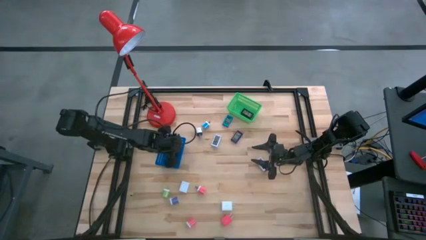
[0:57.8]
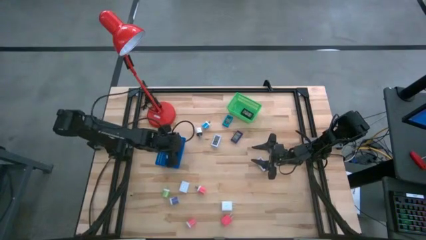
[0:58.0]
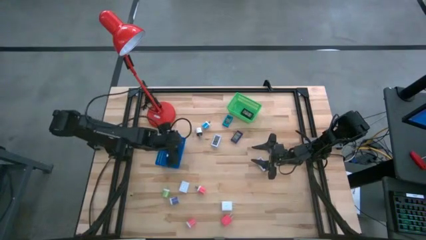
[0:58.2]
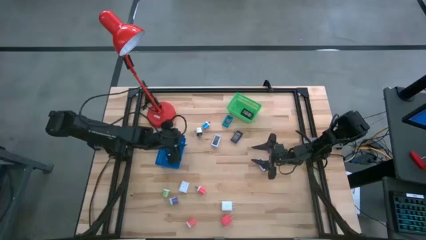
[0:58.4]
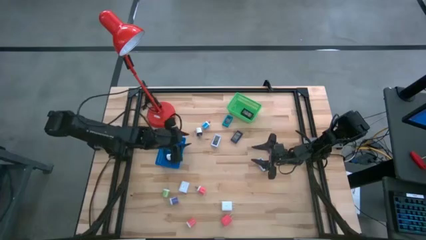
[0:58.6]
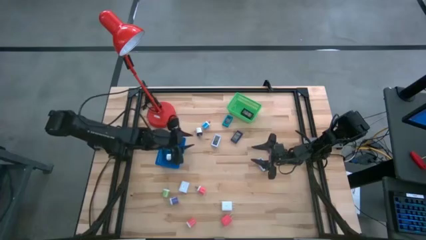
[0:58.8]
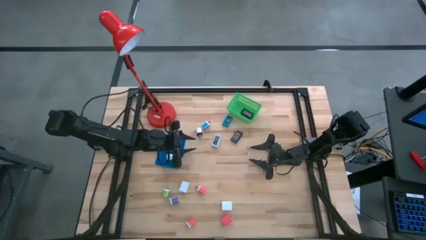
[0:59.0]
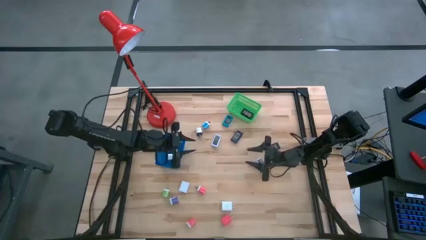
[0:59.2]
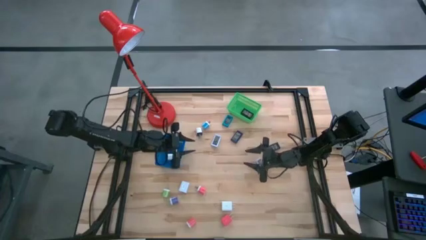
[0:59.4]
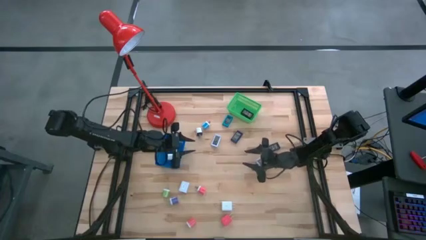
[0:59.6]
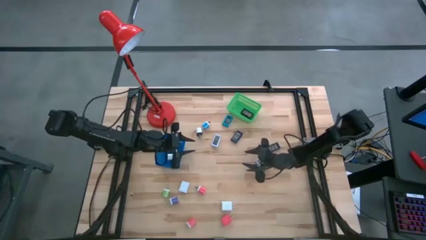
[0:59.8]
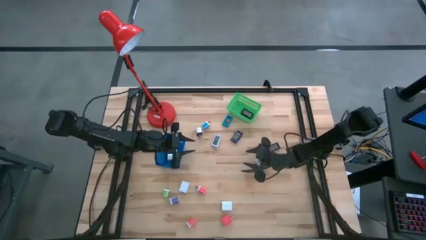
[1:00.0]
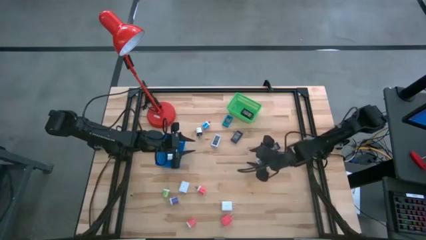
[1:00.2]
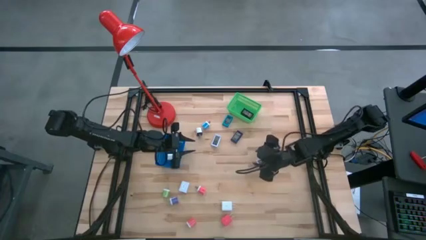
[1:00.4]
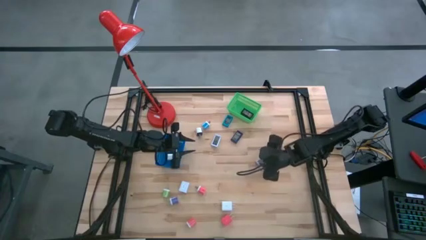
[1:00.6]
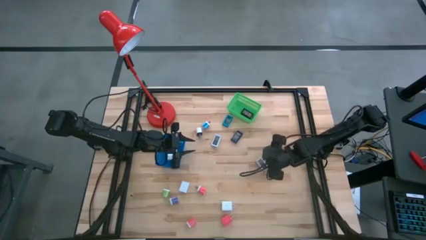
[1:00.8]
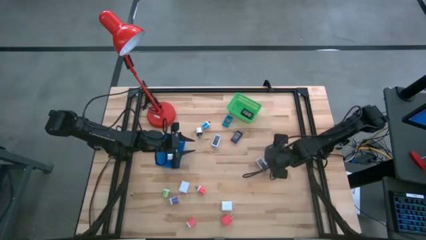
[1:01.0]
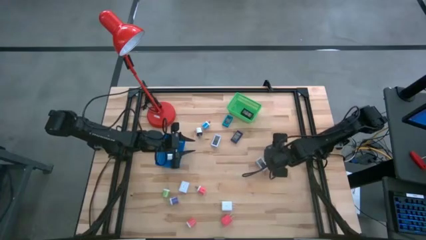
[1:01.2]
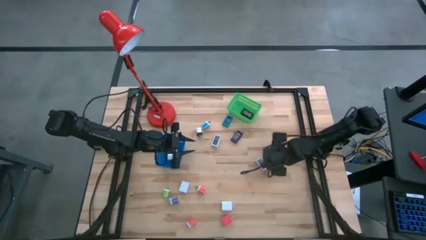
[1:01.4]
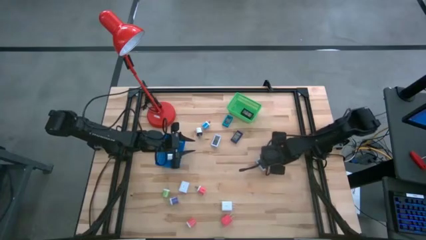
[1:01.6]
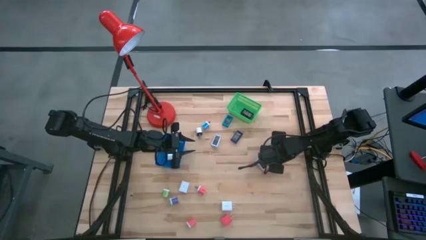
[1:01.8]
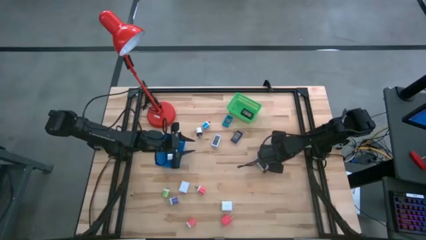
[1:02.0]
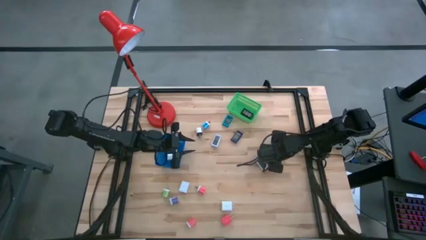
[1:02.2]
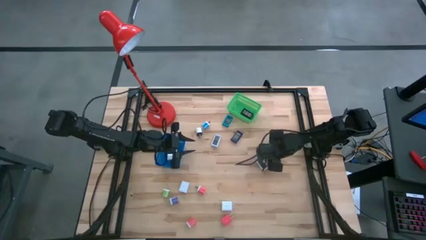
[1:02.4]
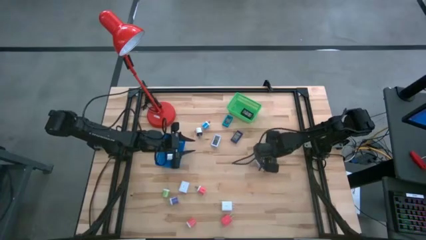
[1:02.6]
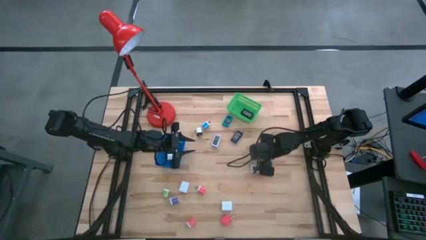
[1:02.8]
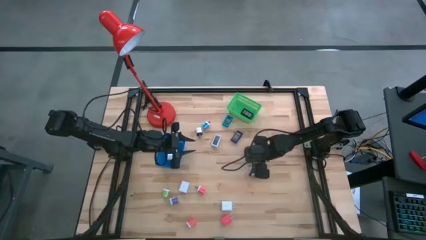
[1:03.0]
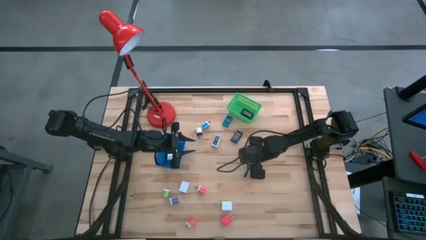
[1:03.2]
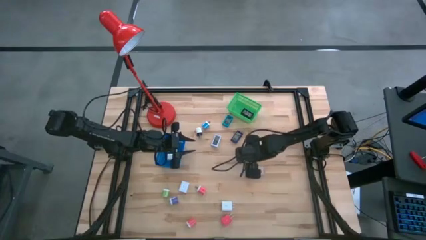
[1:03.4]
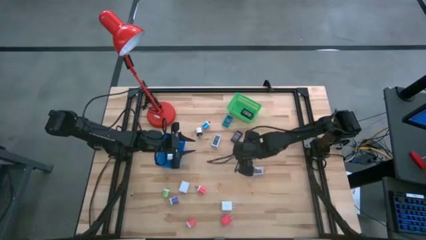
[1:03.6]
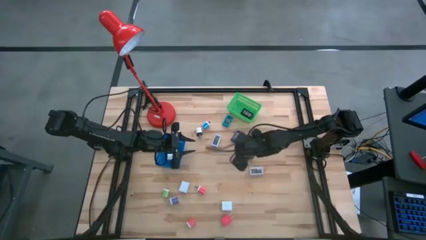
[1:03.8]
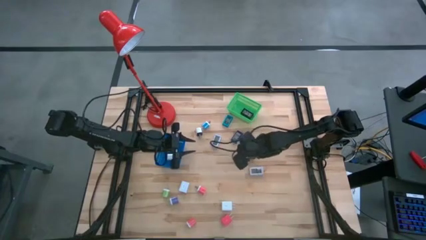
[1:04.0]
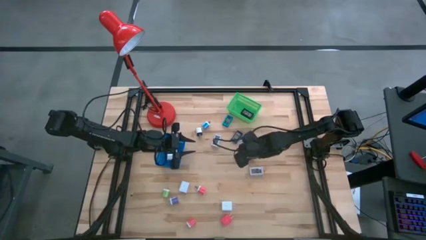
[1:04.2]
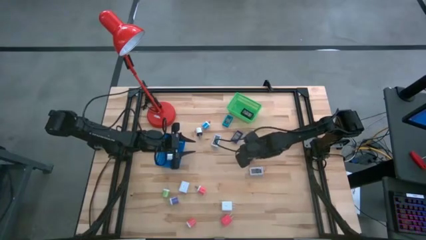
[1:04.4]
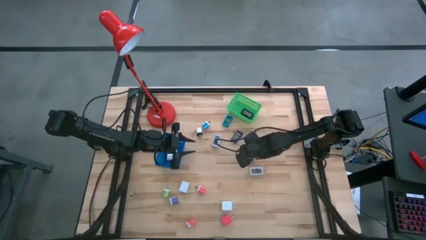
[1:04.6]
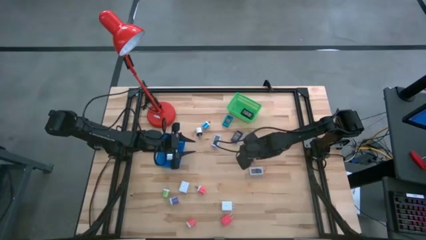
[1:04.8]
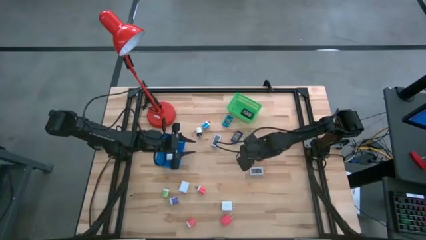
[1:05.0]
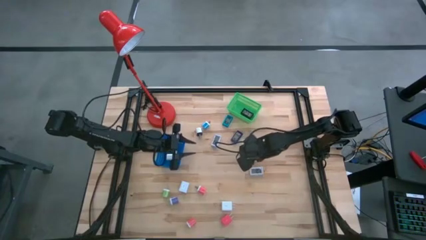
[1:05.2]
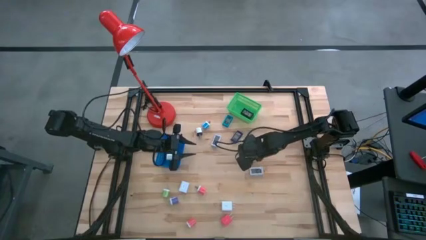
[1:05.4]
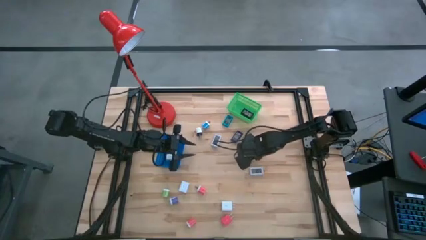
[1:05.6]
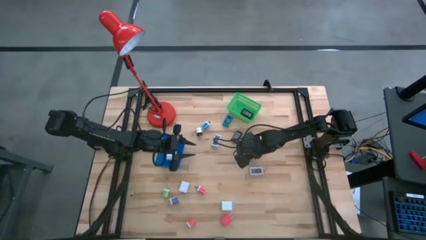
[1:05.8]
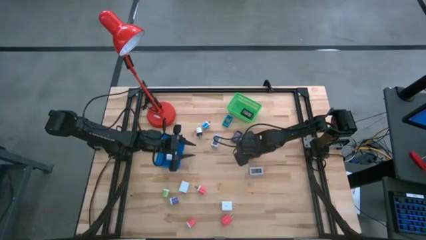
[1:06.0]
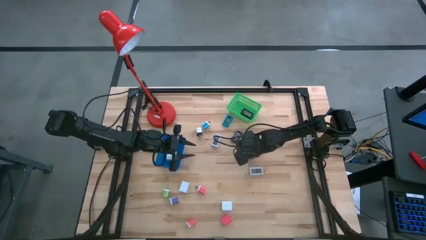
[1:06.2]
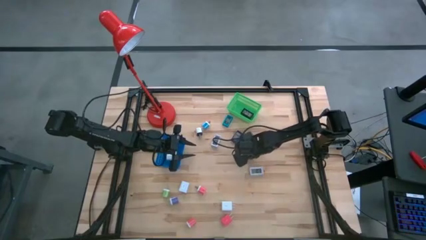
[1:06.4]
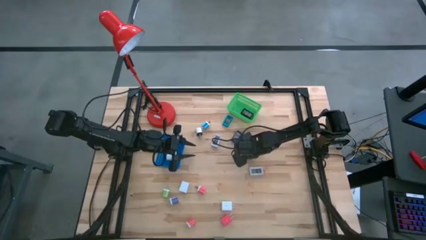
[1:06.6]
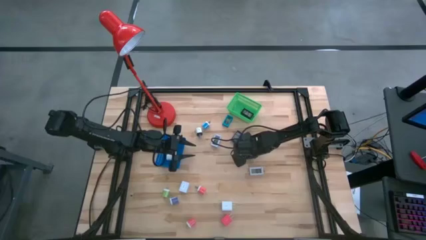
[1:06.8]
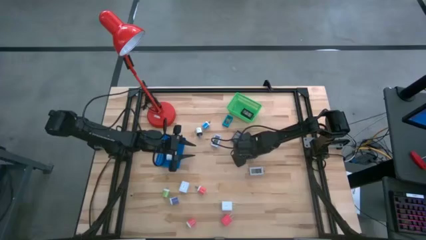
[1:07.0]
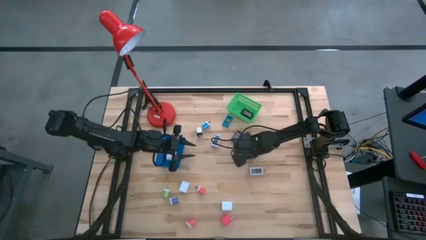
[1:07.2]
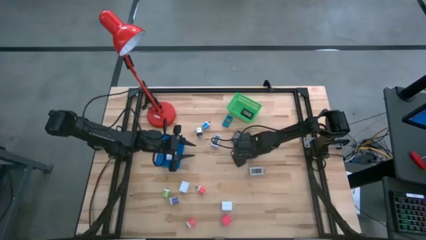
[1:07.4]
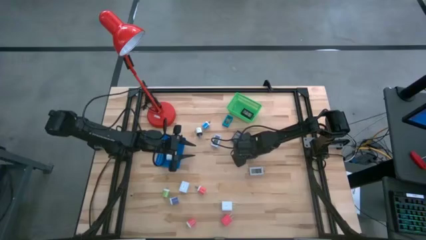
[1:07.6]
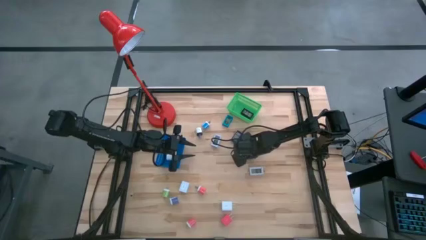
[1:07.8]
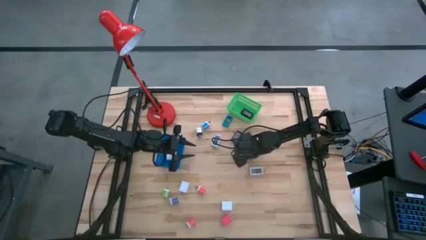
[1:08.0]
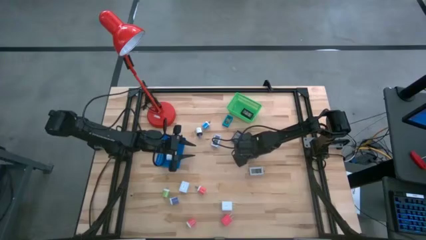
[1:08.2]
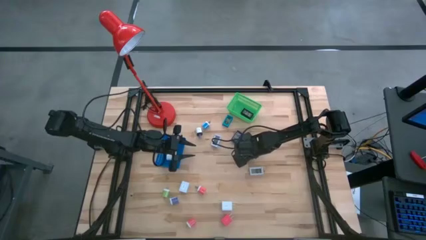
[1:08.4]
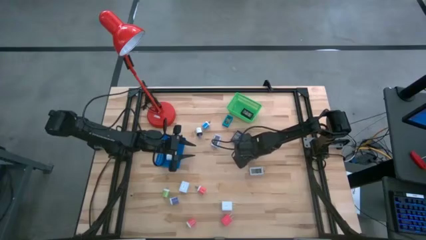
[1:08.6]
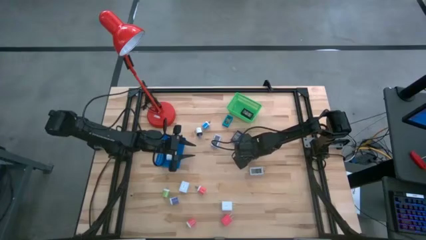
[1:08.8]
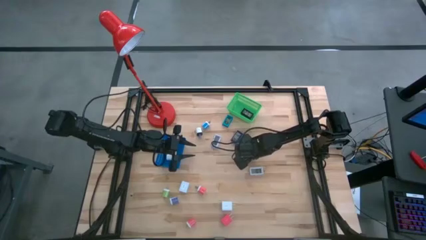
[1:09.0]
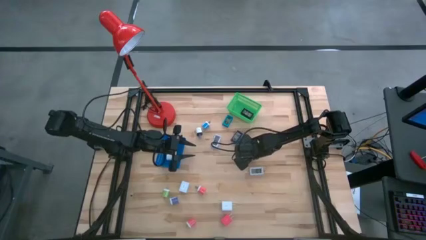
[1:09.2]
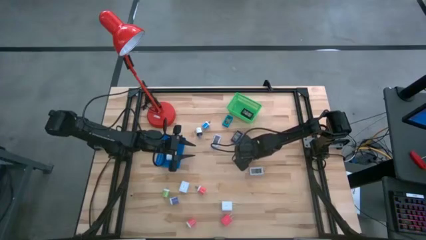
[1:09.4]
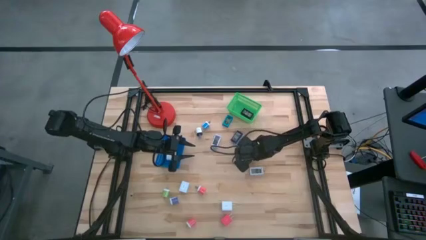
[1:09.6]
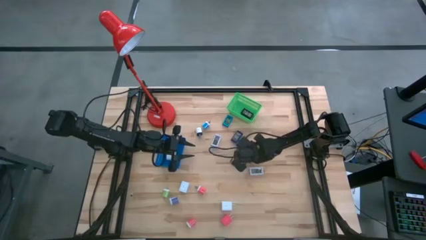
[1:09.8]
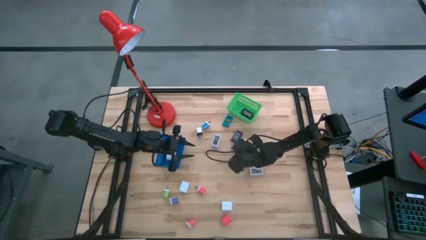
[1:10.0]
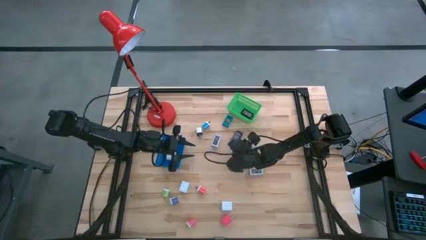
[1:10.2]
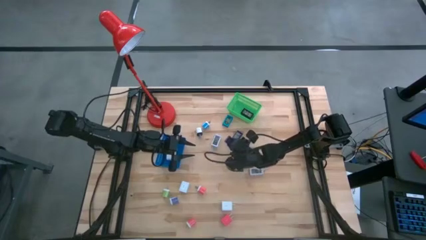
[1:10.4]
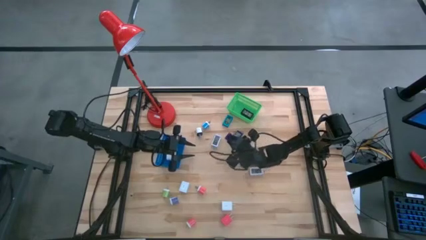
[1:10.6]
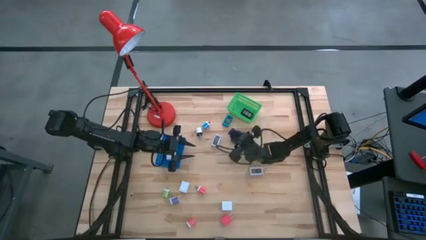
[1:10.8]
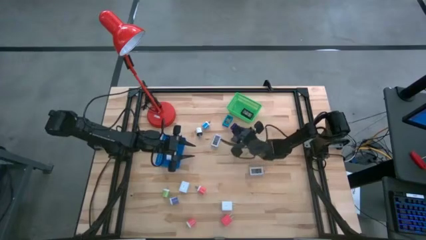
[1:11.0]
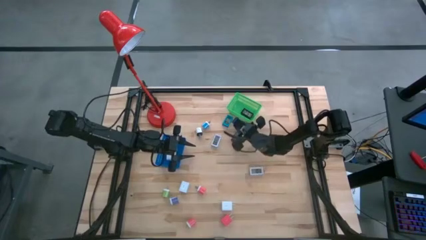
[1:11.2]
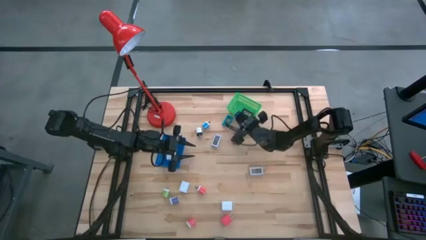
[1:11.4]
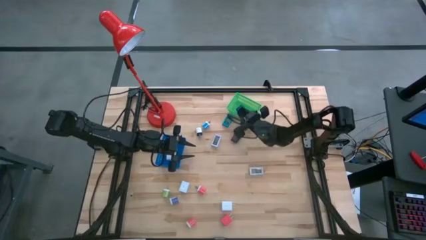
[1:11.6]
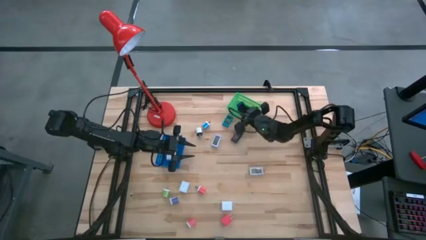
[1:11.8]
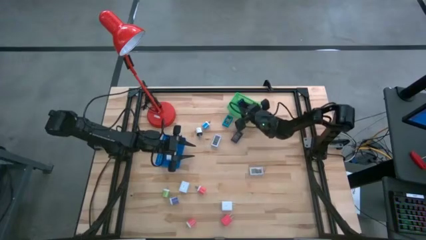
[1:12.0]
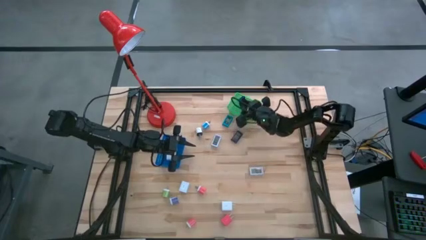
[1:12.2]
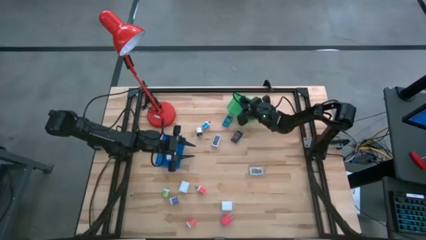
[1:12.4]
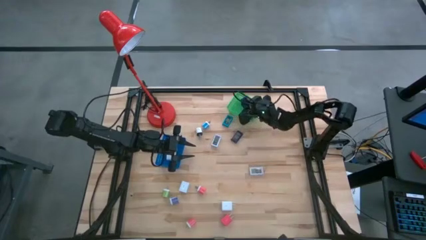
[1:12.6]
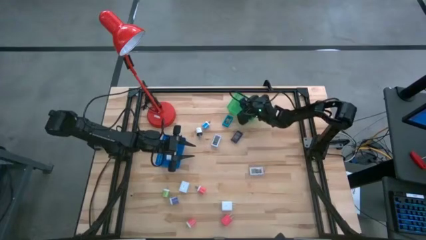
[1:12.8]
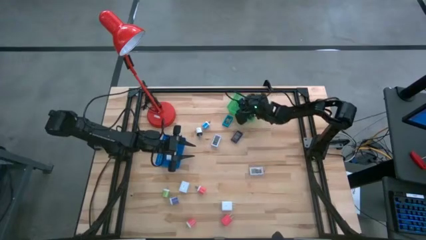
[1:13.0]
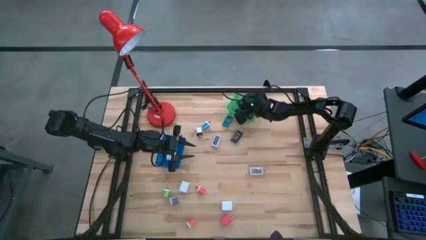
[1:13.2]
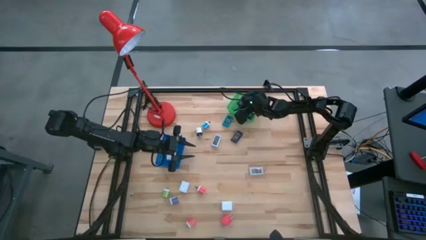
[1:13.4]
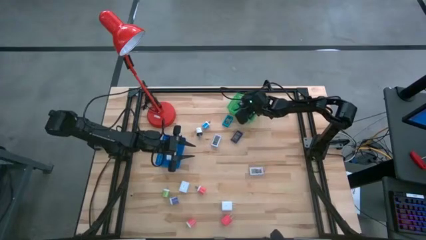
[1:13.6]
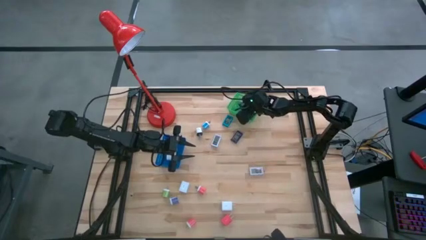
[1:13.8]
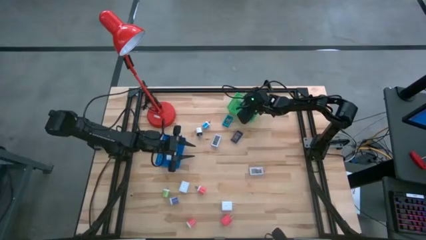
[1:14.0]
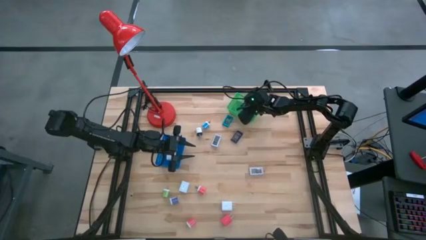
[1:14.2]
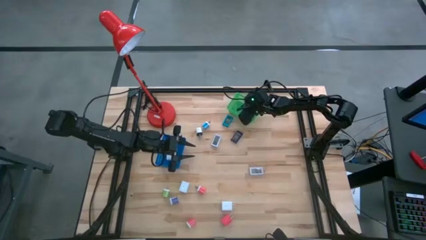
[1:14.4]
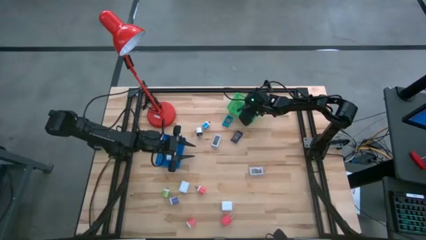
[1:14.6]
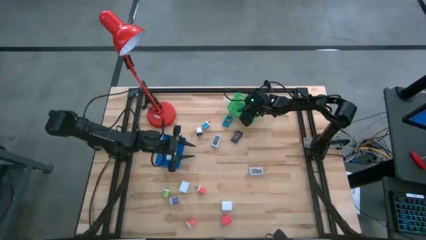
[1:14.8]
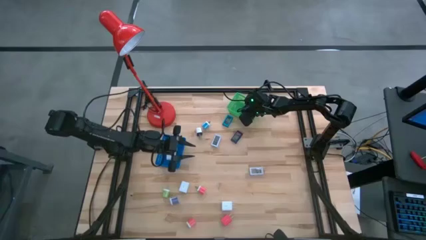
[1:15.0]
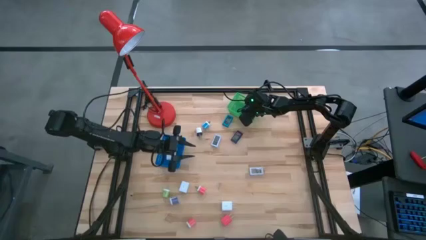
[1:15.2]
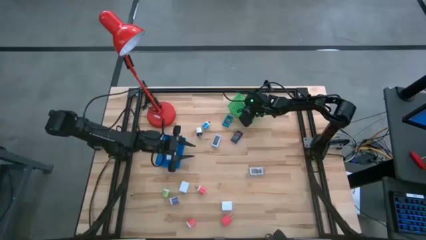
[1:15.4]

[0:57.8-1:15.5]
Task: Pick & Place Office items
Put the right blue digital clock into the green basket
